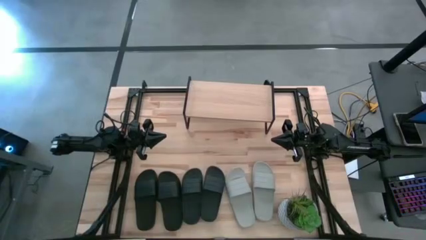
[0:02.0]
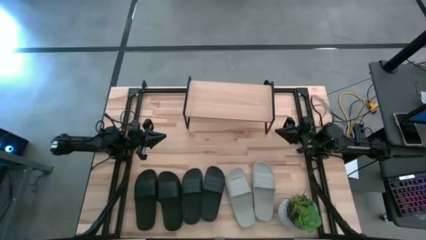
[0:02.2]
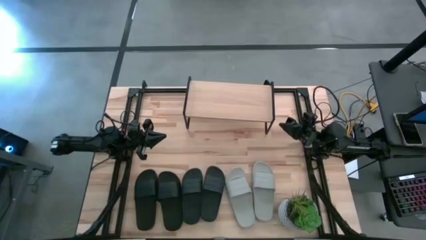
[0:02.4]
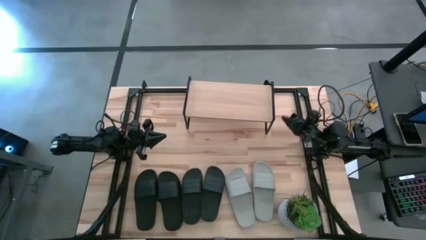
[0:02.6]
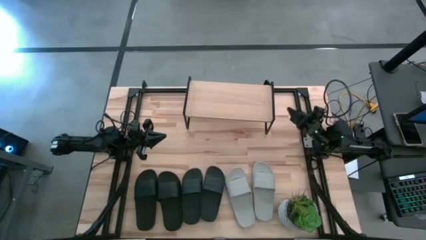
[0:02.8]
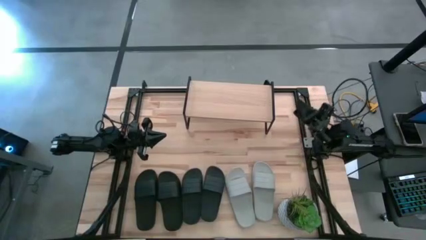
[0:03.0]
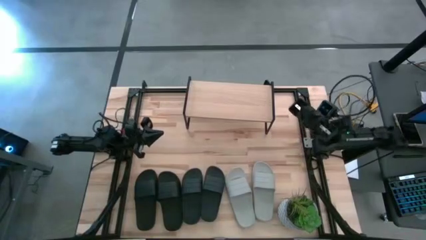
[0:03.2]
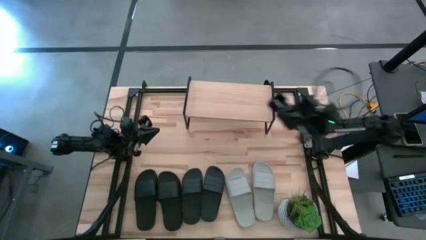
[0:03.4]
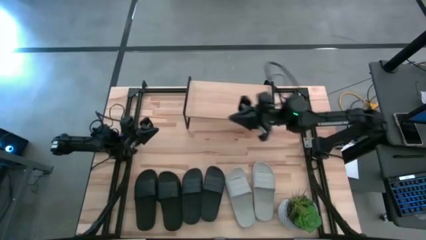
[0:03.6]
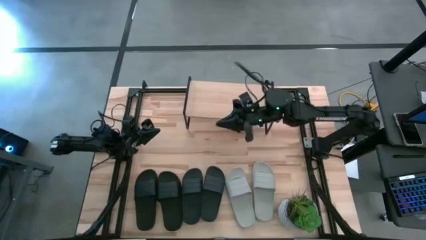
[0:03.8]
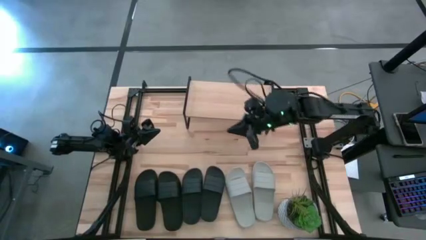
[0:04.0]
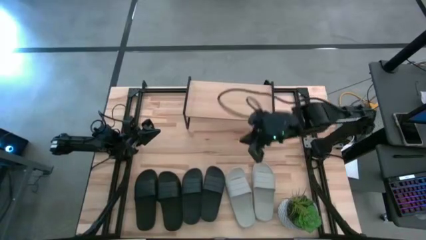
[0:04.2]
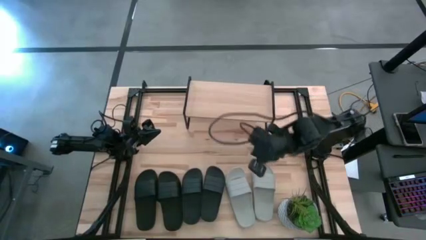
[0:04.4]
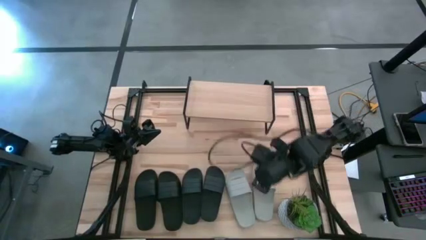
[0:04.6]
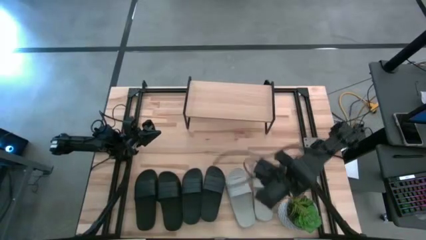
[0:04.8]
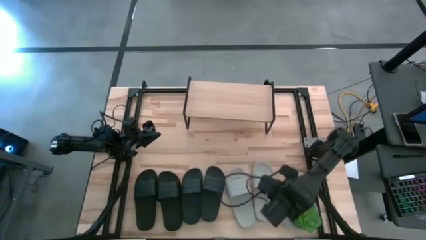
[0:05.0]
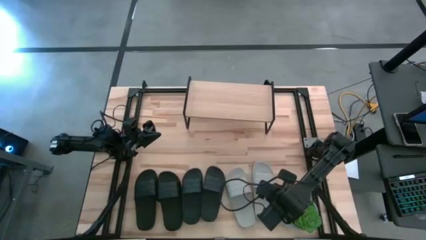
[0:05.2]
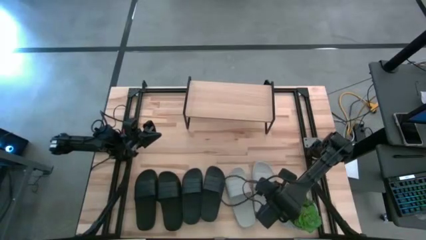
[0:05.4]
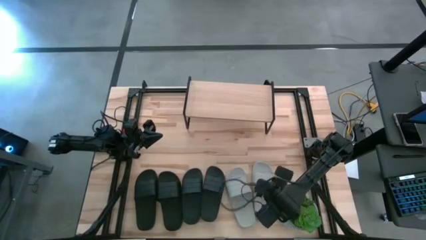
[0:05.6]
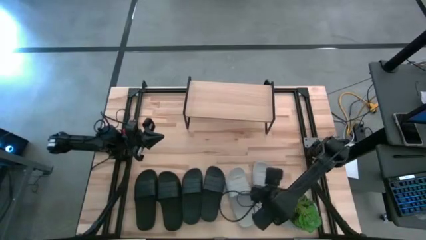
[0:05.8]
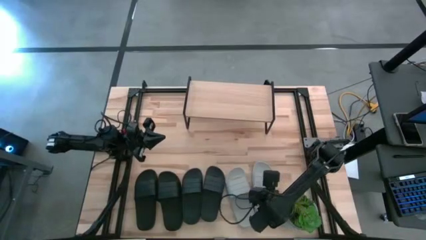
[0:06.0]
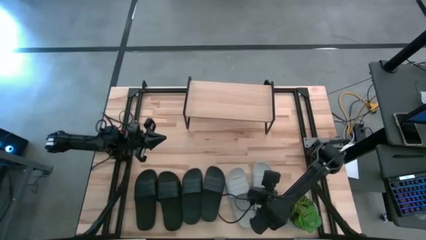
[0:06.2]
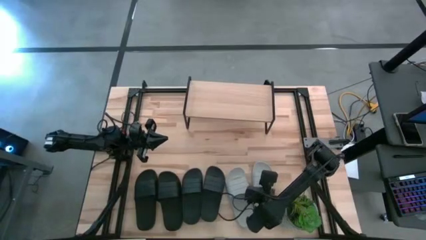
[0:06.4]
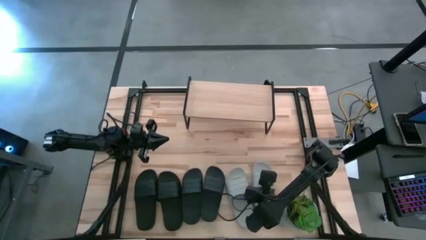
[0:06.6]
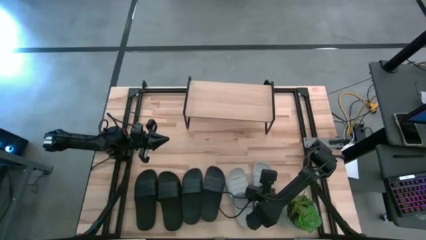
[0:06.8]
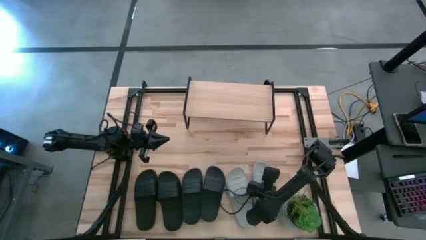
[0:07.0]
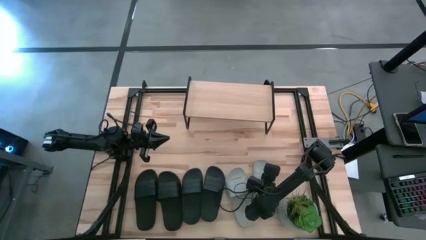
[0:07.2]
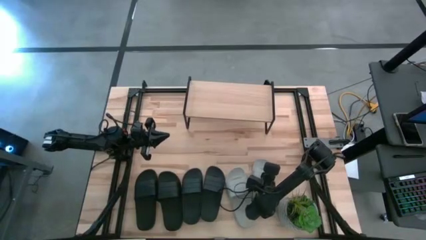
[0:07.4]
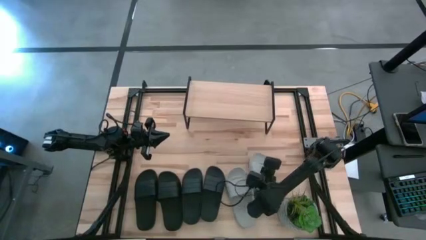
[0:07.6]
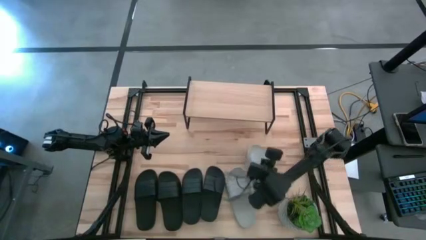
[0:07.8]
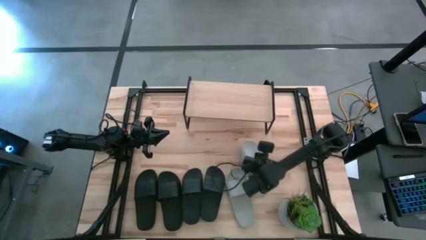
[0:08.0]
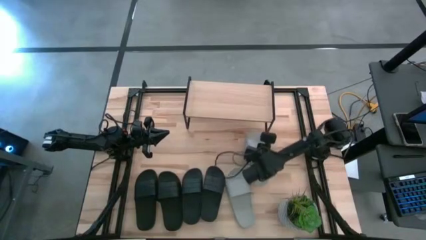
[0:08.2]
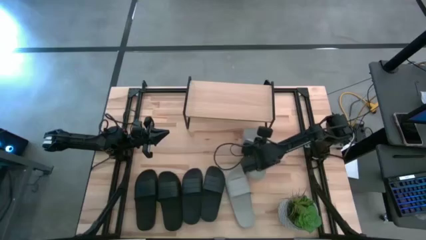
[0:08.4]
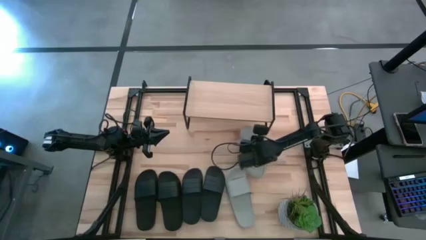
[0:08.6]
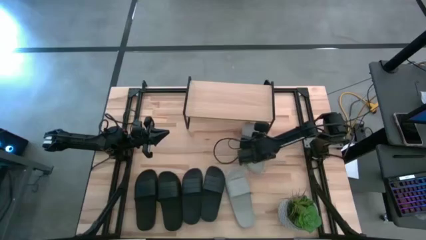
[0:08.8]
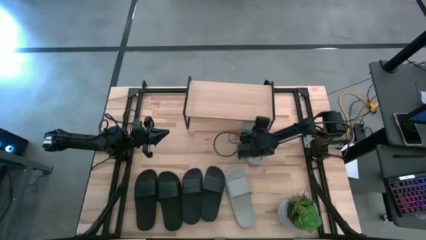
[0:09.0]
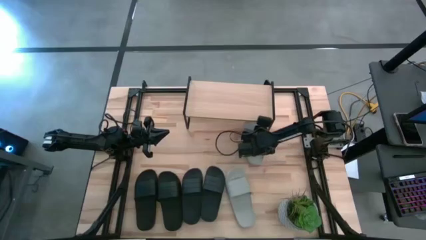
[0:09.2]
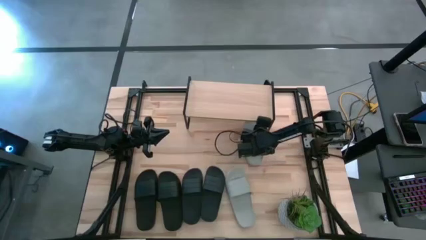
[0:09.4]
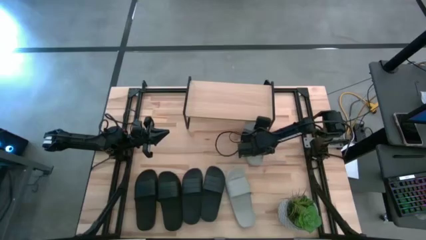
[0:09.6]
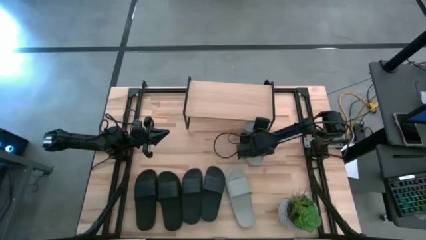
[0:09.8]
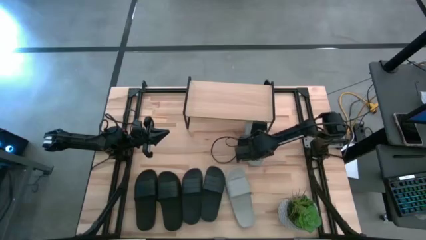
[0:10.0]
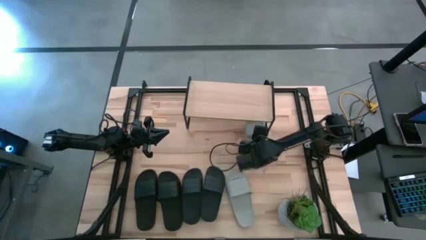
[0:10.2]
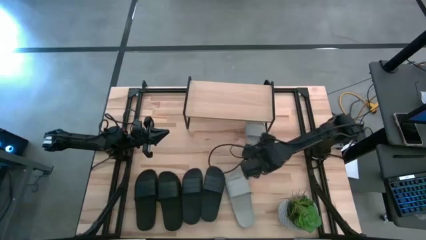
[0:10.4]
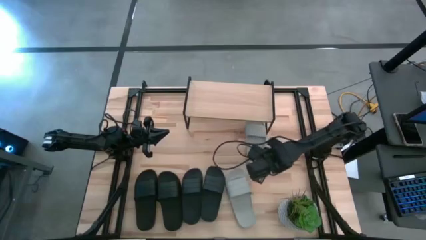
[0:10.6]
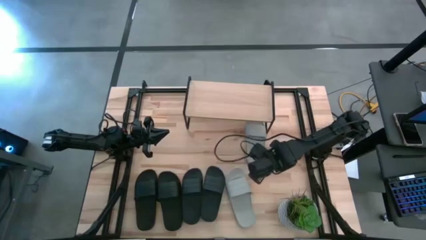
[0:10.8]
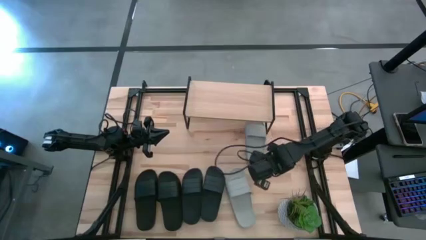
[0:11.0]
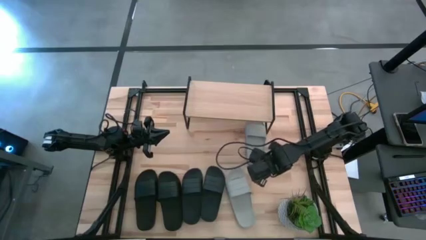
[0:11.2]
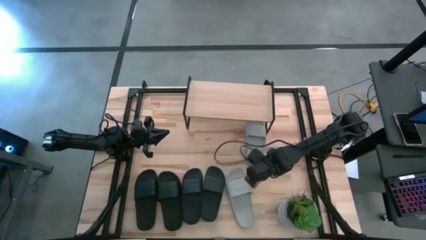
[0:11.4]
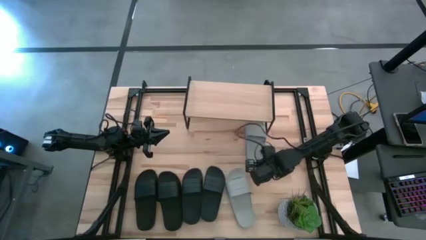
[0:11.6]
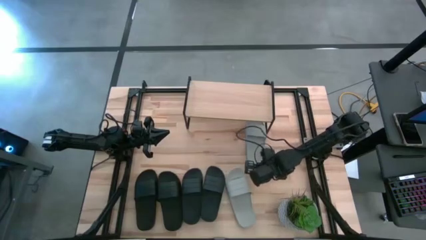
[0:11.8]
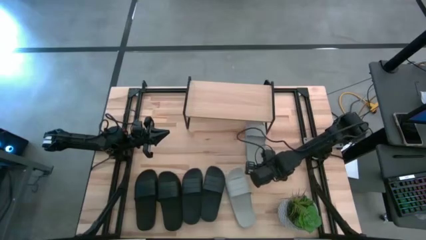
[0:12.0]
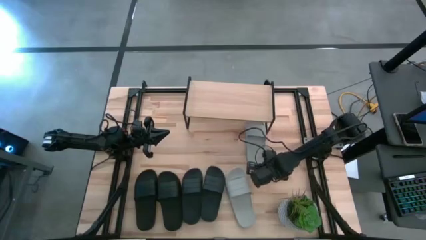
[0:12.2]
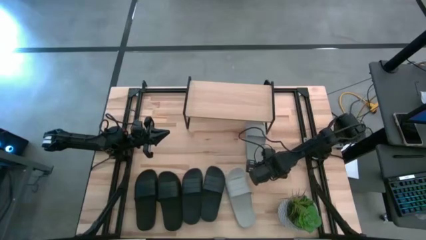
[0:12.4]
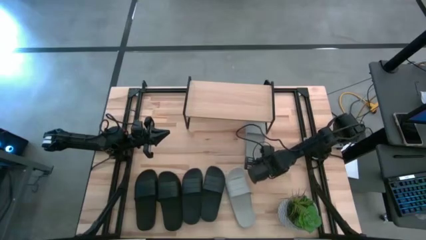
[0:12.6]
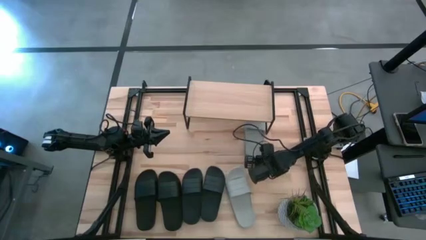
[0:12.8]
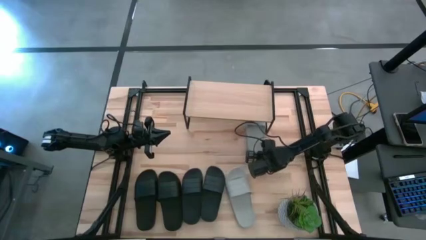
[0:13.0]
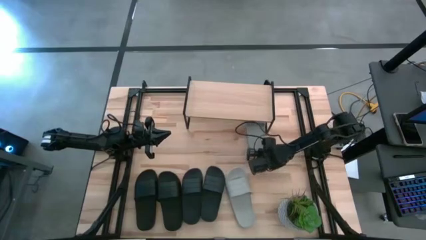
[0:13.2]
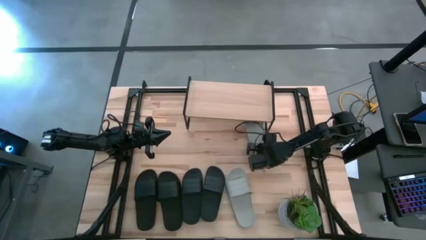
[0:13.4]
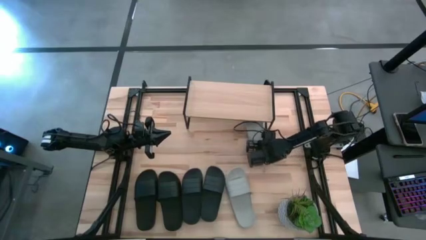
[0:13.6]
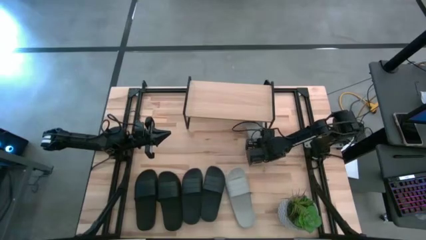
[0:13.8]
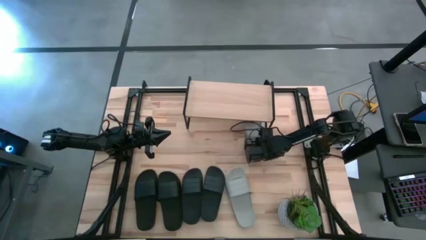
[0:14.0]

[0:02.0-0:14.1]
Task: Pick and place slides into the shelf
Put the right gray slide under the shelf
